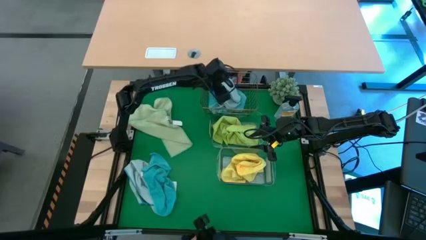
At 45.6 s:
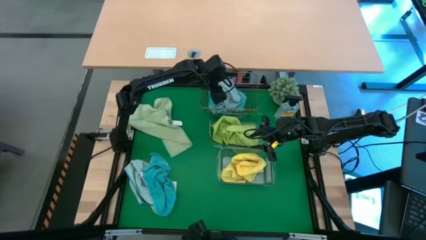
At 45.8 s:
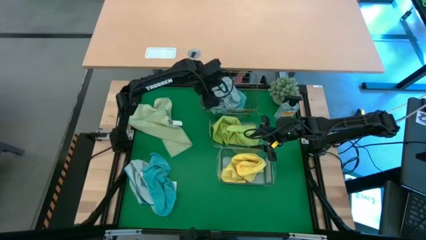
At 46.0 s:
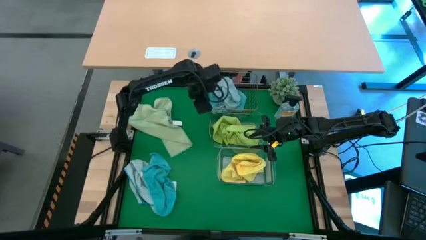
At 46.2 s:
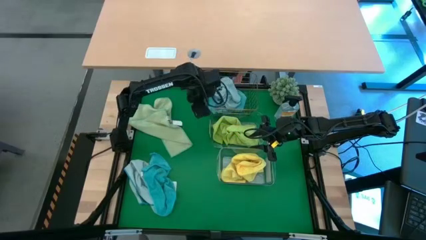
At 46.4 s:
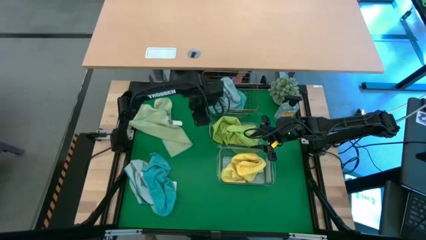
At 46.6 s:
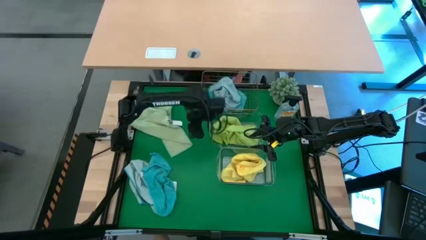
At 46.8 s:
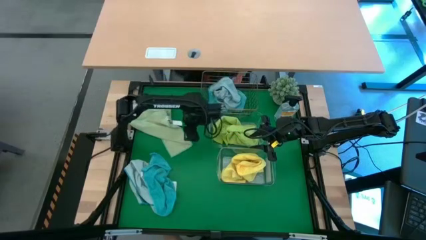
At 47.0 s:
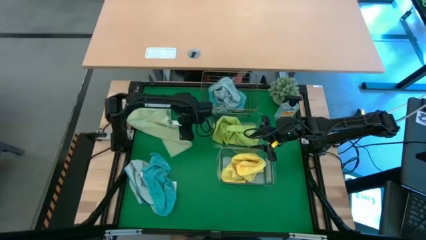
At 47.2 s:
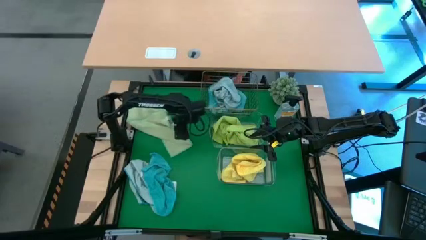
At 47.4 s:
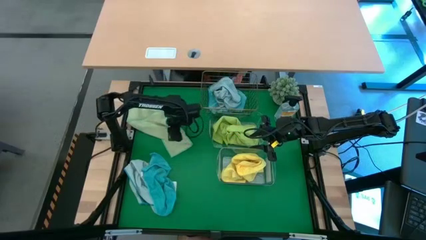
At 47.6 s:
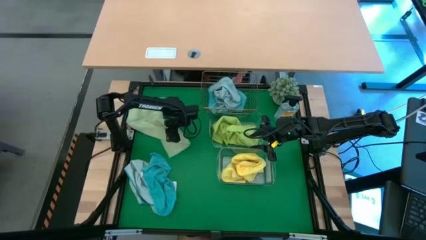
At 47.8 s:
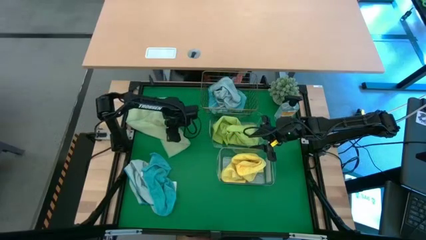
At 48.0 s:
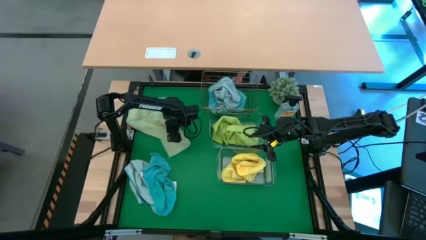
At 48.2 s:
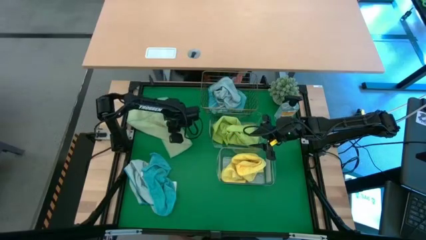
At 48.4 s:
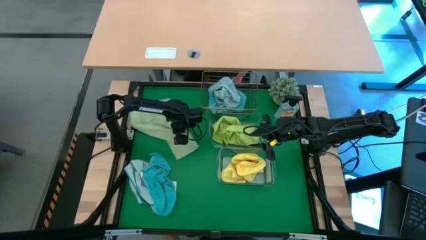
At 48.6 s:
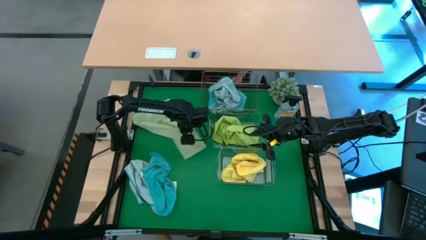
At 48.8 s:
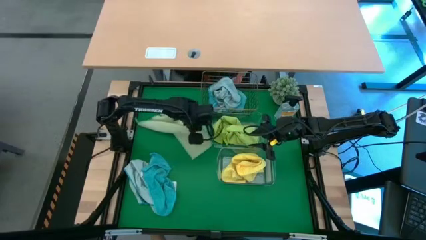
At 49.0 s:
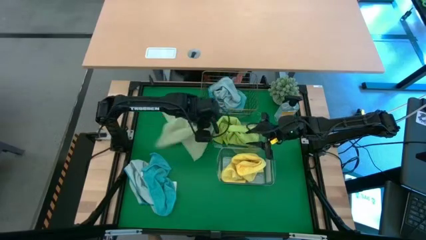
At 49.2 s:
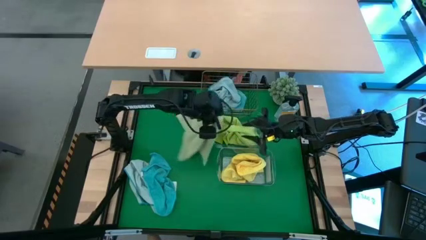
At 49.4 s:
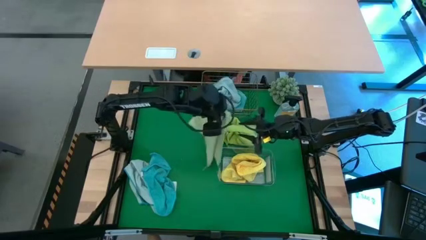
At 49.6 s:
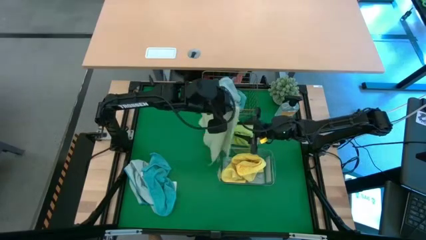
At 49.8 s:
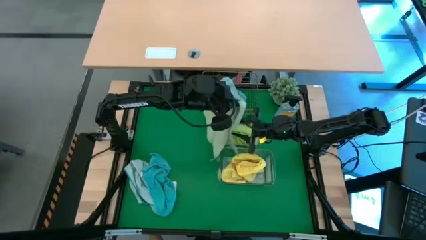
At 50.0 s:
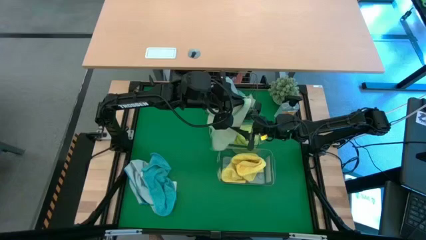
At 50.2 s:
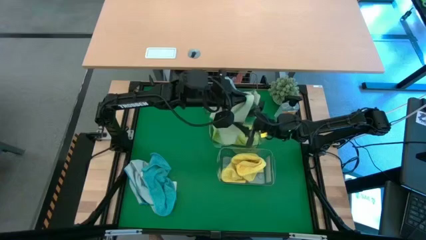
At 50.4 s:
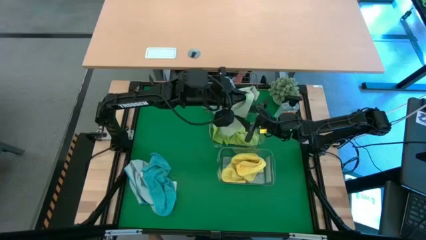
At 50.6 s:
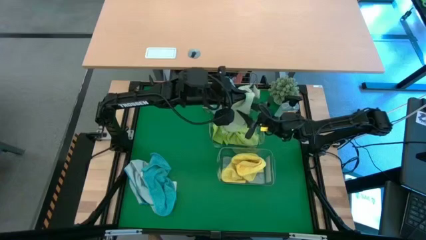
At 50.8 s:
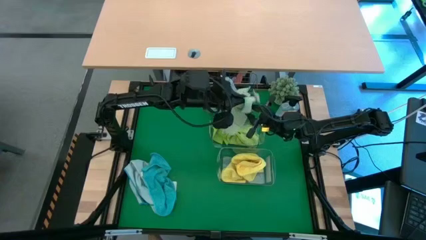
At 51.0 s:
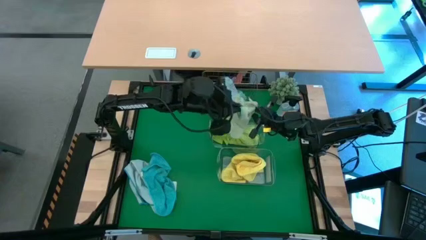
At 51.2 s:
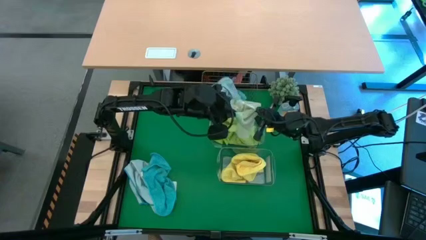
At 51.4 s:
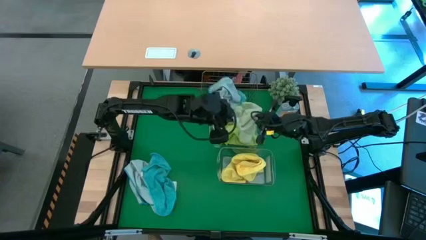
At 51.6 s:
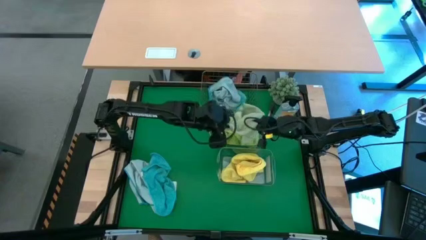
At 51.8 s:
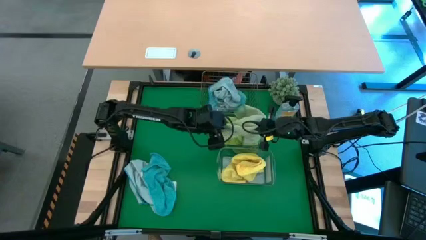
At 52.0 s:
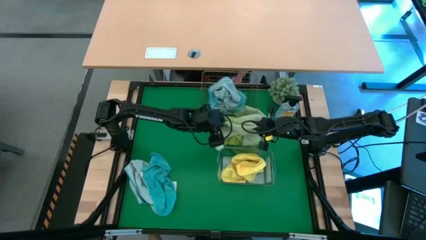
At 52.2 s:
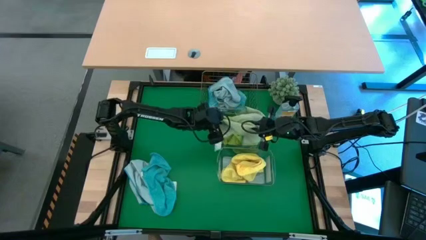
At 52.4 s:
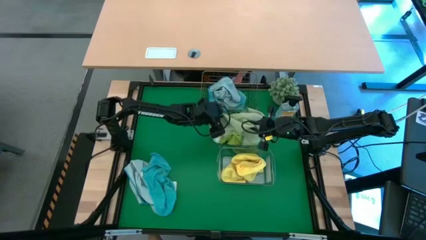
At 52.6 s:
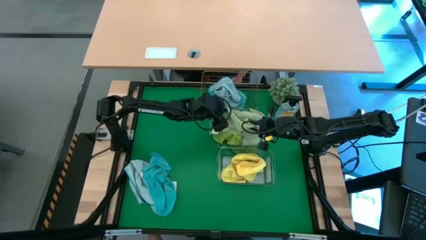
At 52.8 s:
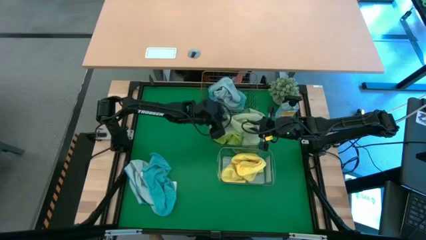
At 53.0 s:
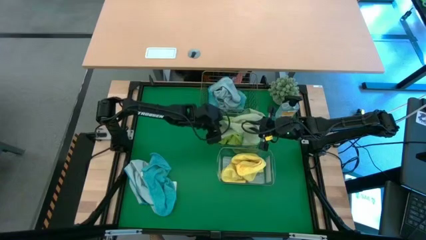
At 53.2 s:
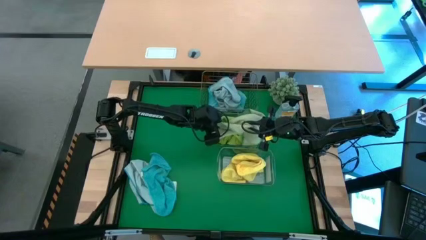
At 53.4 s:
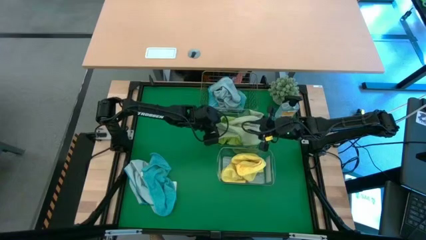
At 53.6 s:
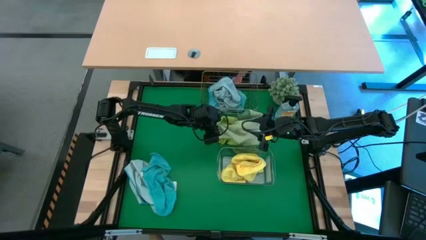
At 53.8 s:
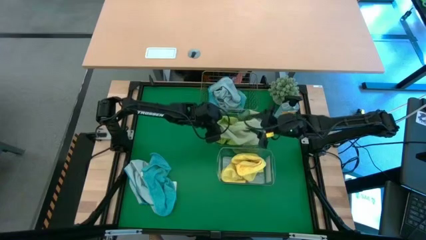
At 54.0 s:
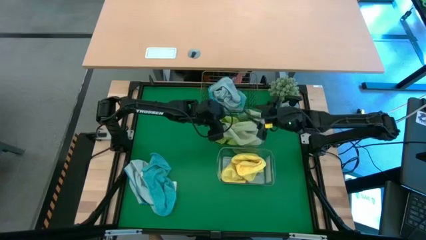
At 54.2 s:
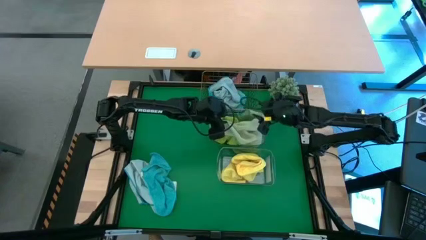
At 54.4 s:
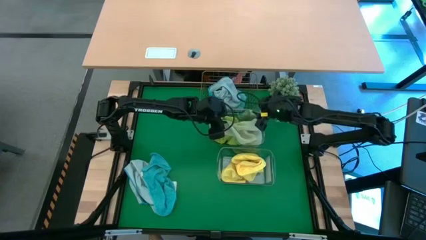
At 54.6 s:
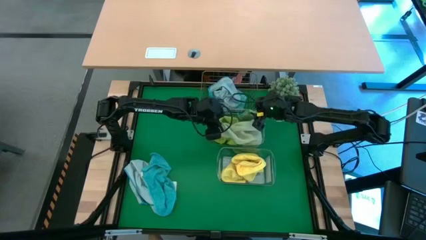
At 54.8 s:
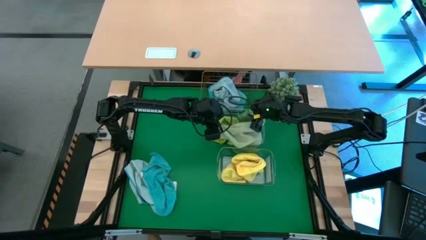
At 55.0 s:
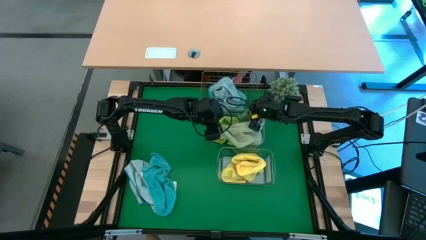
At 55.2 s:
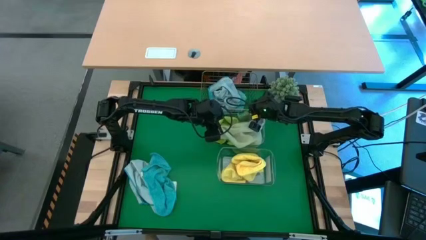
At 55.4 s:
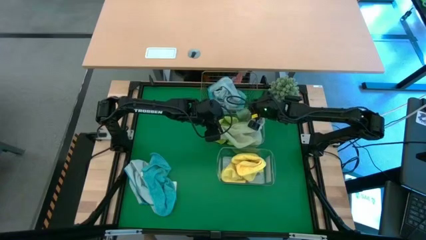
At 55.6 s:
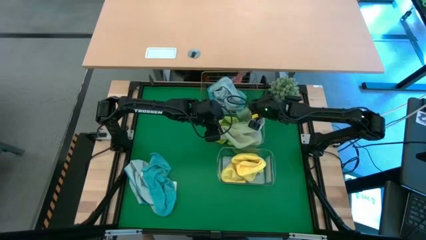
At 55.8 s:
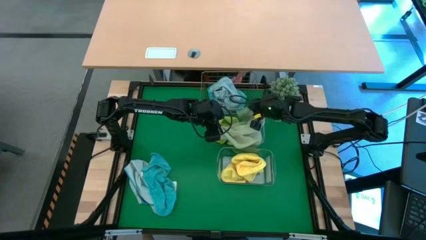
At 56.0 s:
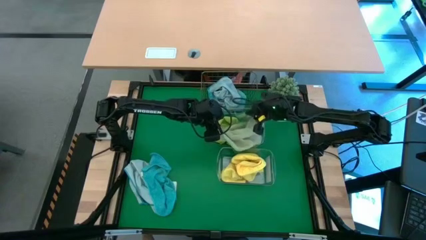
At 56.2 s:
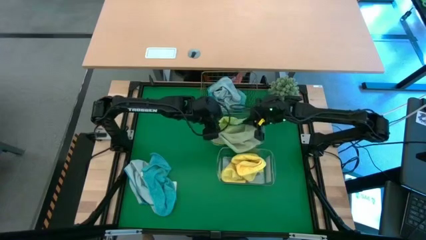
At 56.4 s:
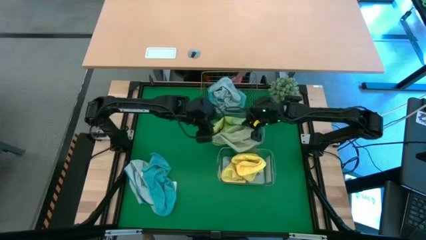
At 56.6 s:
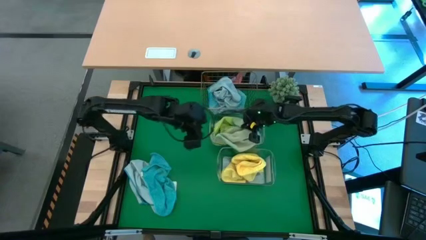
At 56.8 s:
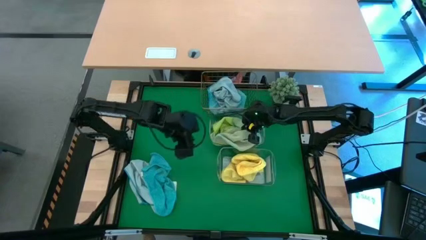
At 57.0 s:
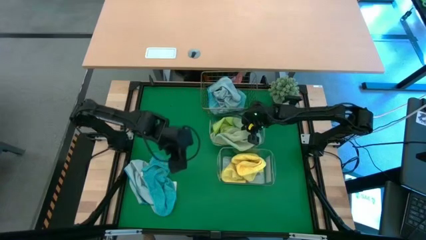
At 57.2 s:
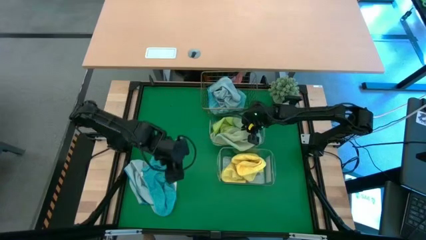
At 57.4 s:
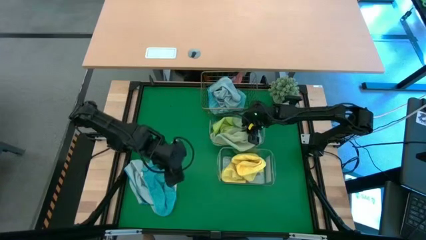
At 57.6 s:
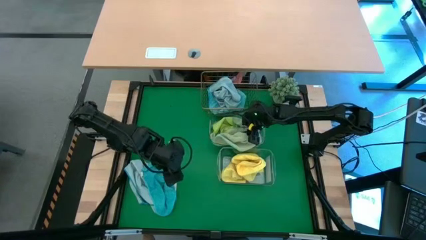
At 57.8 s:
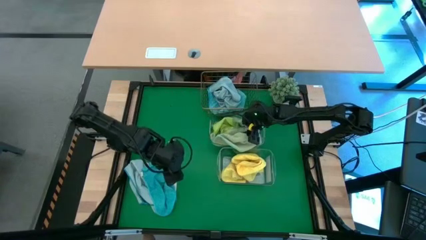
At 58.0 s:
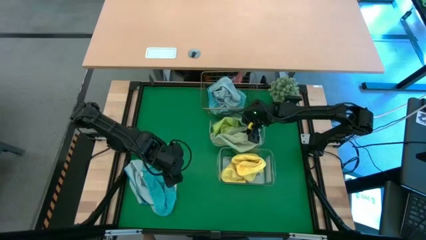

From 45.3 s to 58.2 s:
Task: Sort microfiber towel by color & place in baskets
Put the light green microfiber towel into the top transparent bin

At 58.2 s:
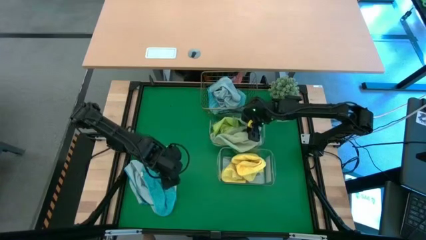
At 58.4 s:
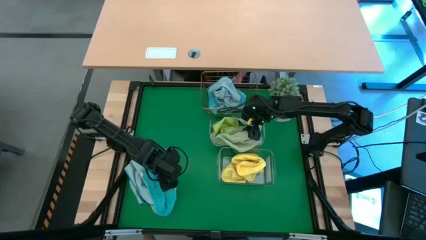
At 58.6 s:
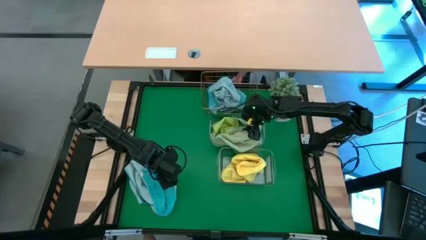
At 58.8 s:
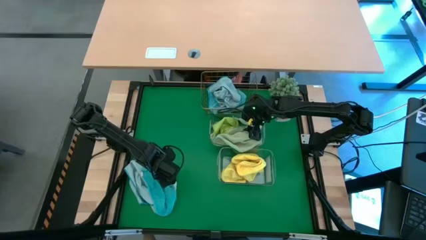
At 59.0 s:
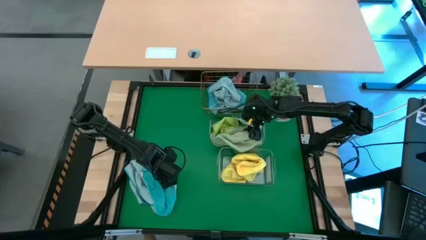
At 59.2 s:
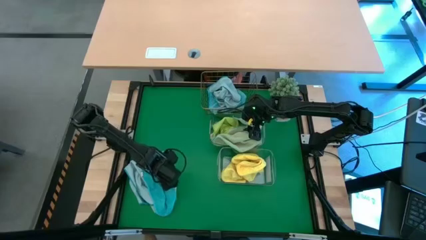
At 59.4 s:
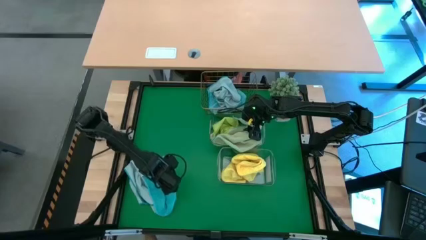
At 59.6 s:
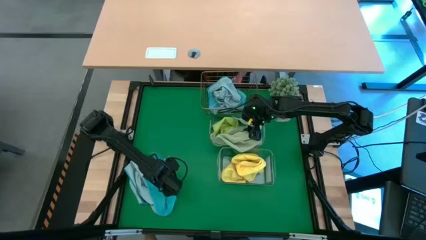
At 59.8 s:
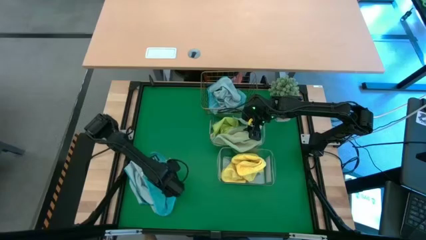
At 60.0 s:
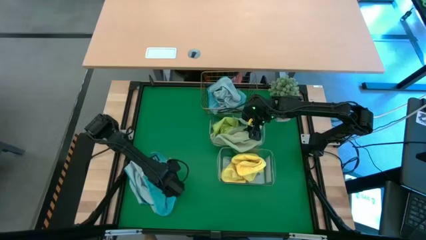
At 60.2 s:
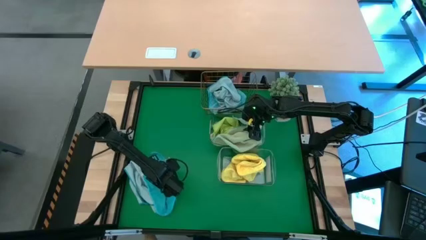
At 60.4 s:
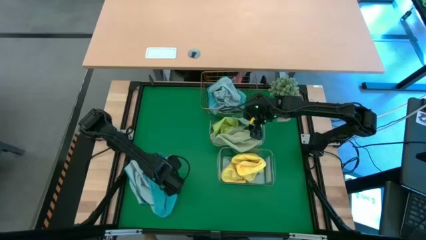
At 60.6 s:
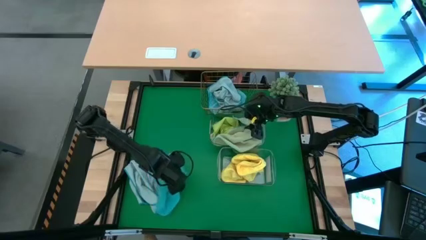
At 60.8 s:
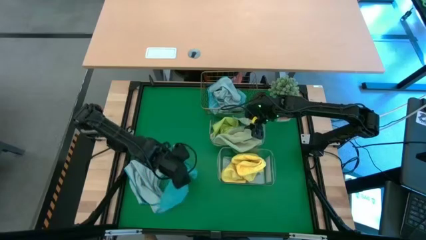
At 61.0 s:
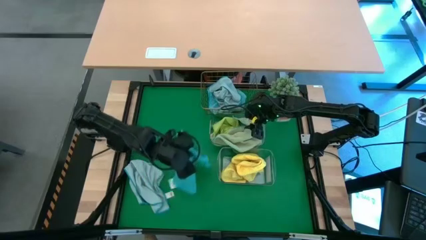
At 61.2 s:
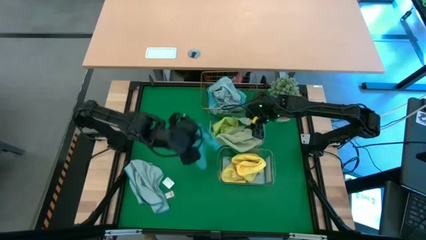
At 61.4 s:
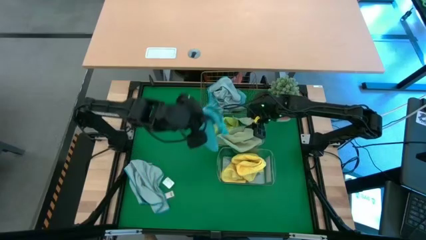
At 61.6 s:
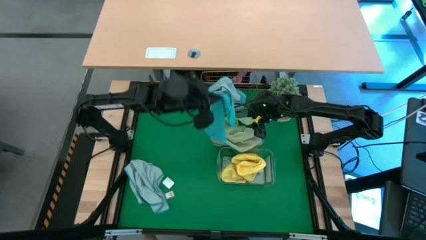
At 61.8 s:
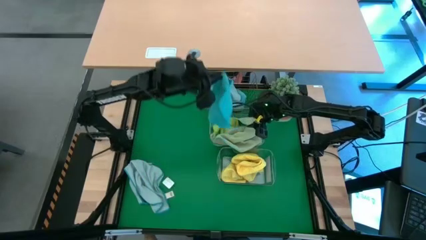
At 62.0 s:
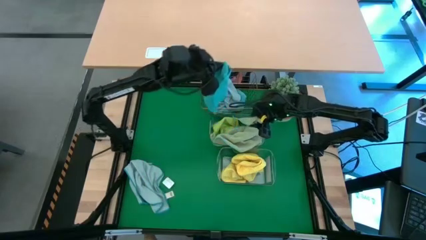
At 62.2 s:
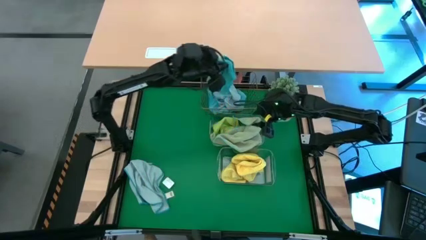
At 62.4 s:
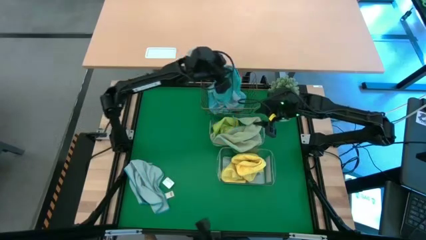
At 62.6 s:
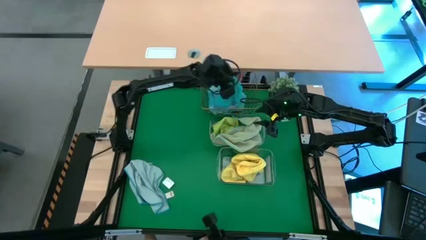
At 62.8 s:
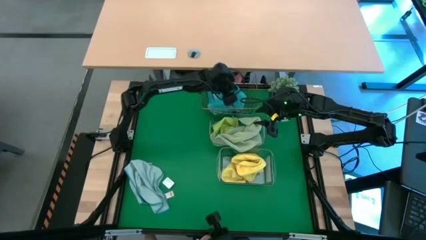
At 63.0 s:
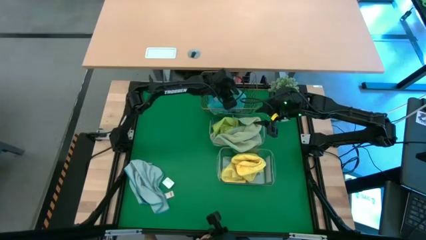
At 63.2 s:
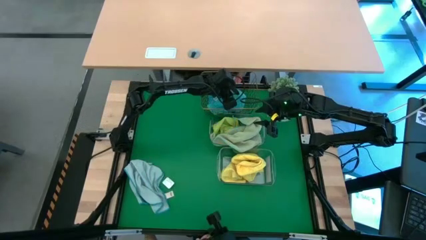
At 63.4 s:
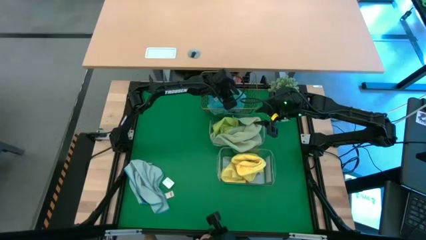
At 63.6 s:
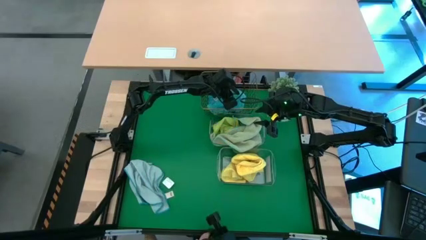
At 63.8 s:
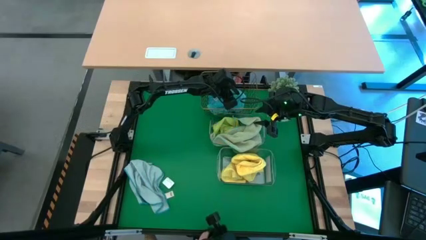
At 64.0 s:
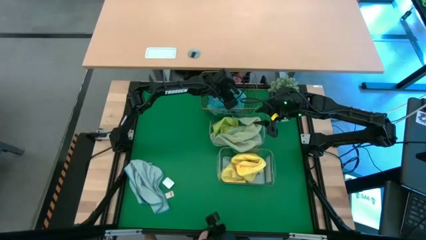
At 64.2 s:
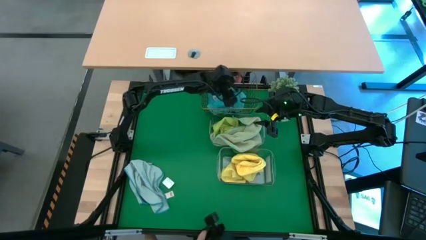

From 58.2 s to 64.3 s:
Put the blue microfiber towel into the wire basket
